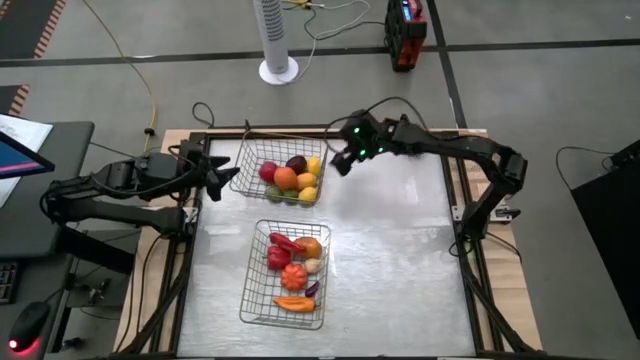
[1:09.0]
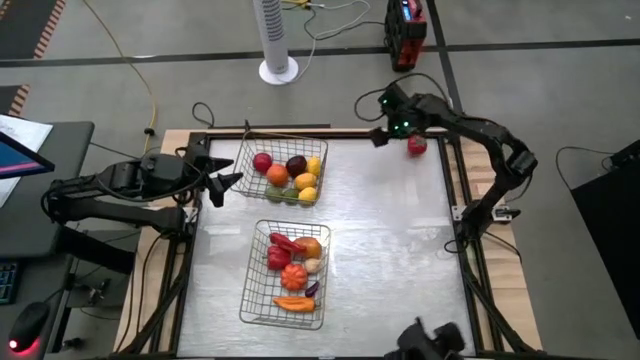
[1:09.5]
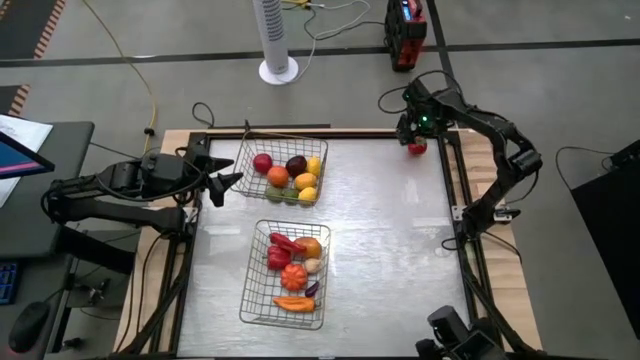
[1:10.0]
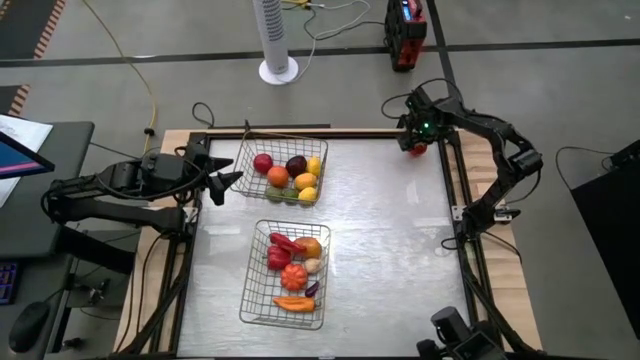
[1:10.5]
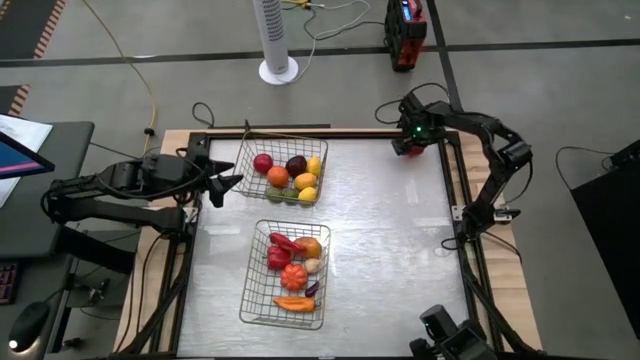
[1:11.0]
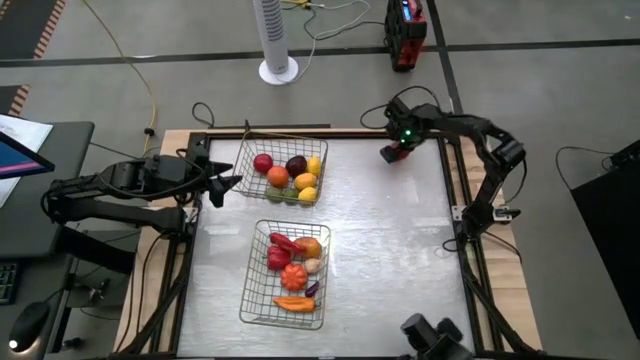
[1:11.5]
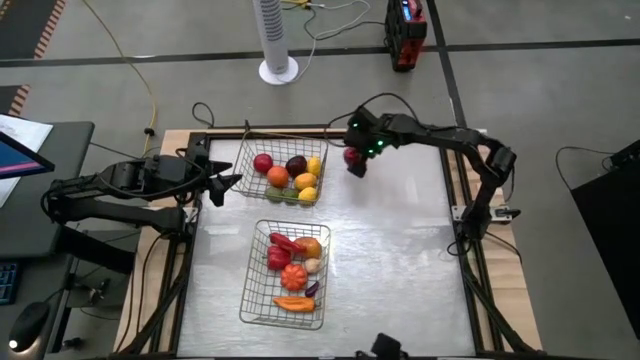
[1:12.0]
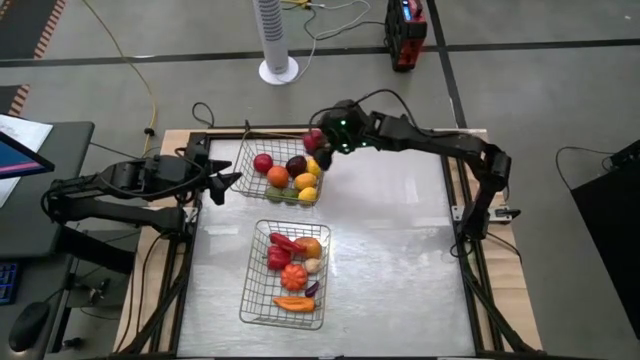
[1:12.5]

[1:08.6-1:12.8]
Task: Sort produce into baskets
Put the tomato into the top wire basket

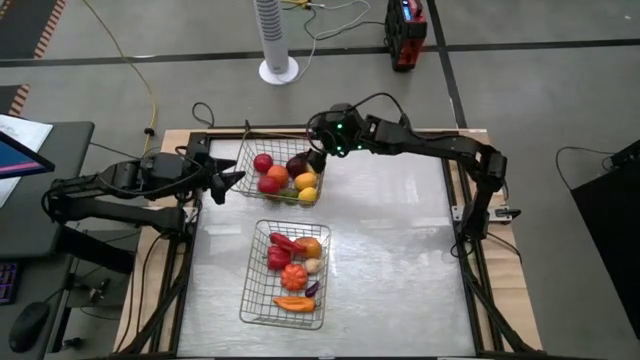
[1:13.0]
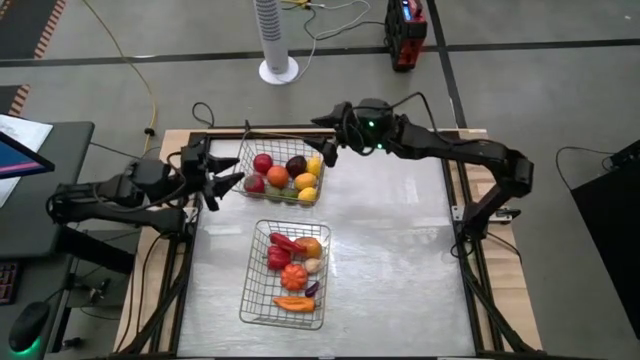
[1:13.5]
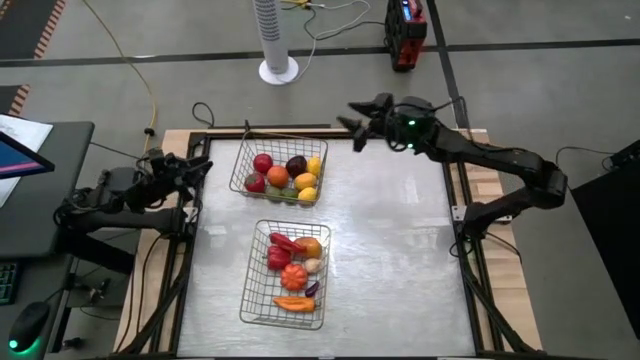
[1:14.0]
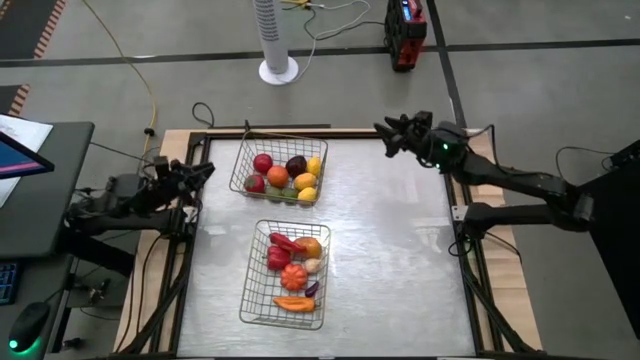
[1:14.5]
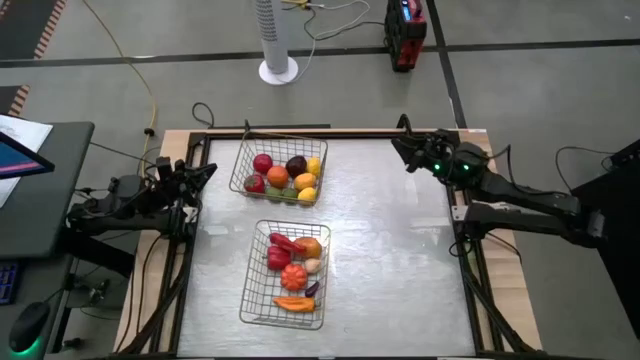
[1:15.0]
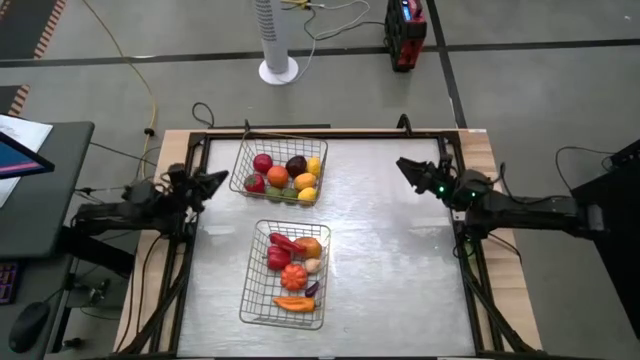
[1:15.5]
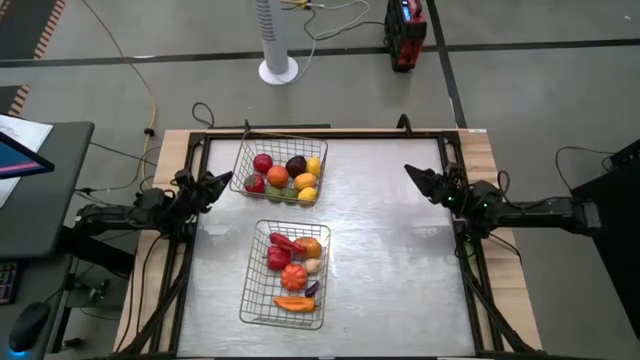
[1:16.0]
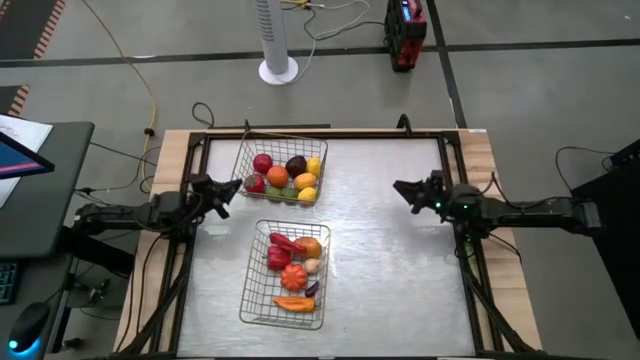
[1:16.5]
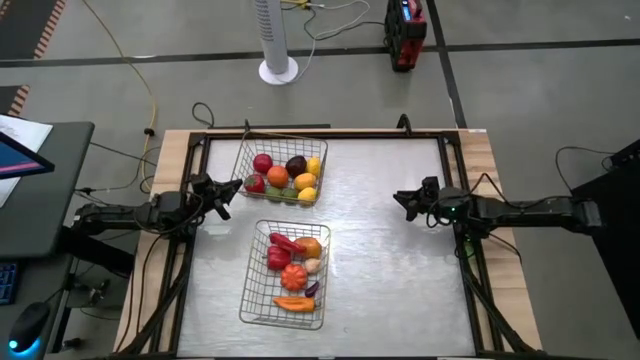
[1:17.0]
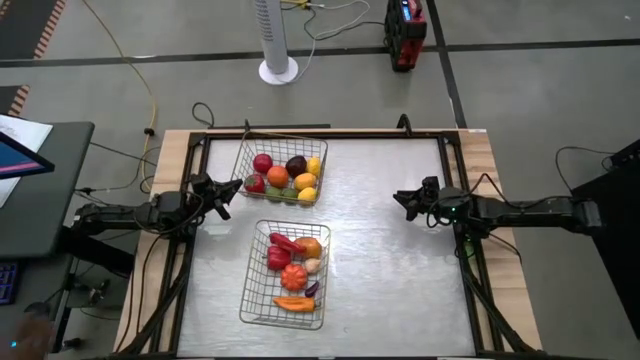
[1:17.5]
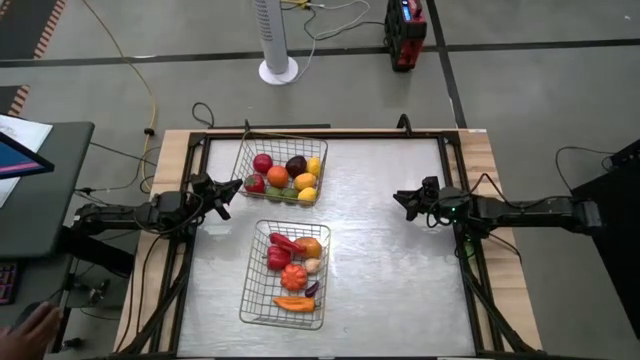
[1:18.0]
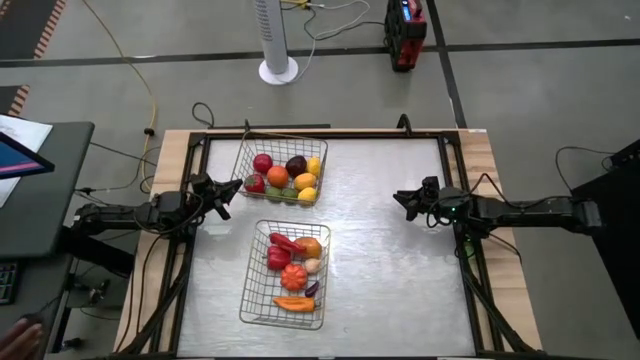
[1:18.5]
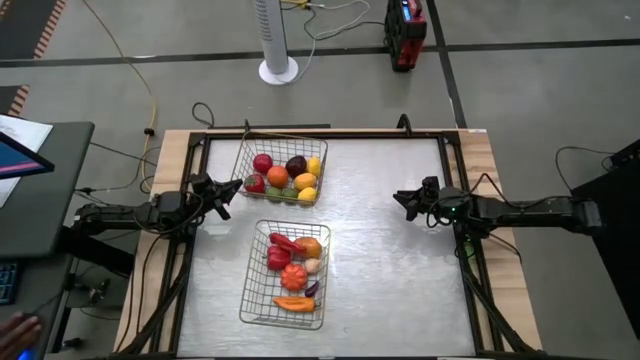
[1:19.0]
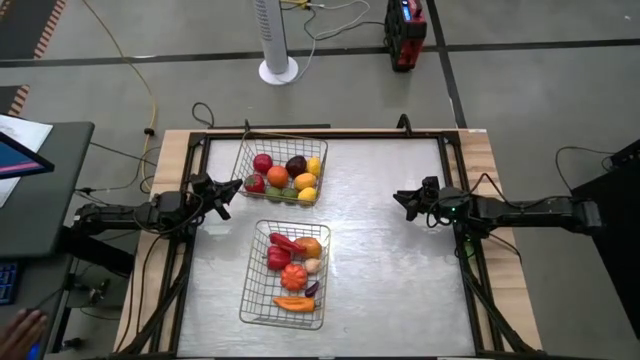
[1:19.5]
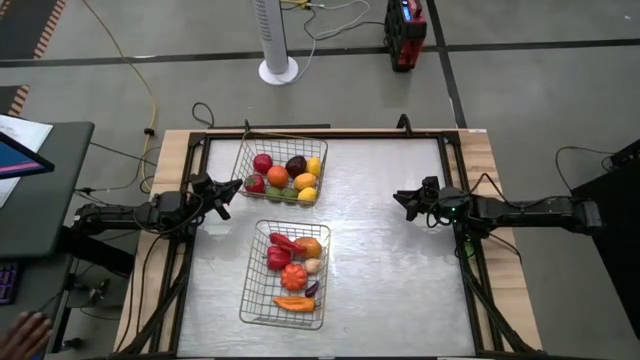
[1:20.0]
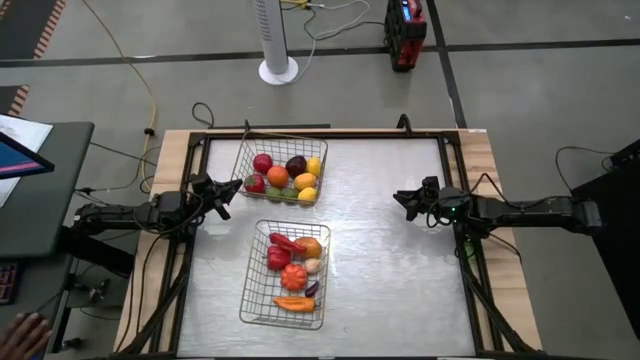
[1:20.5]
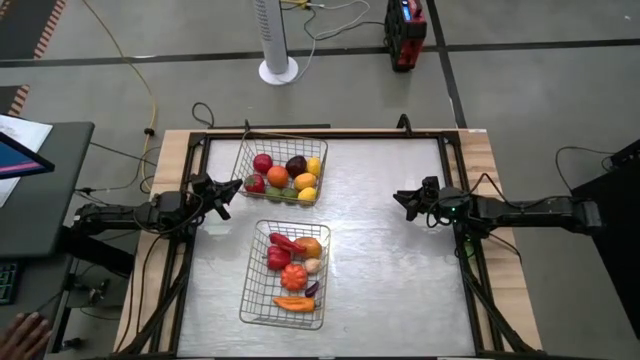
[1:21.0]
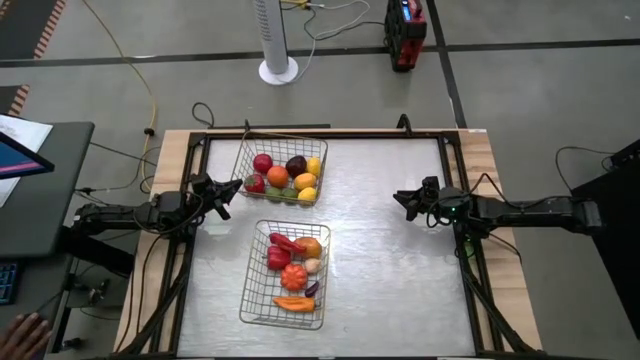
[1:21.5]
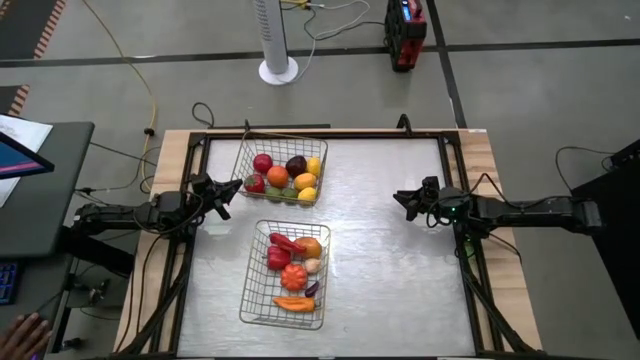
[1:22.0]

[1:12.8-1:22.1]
Return to Home Position

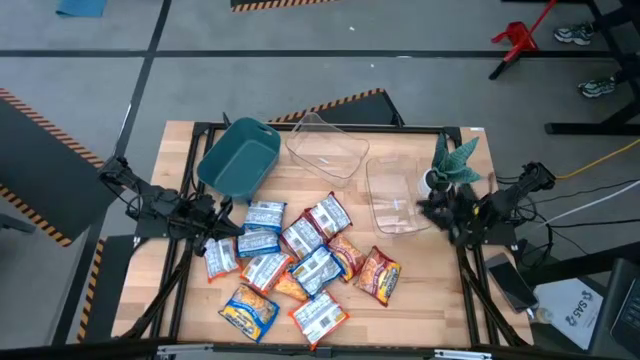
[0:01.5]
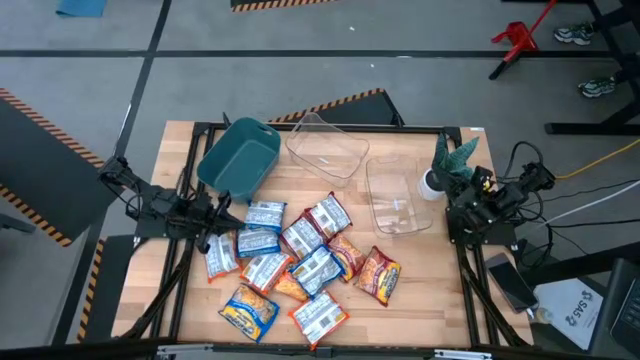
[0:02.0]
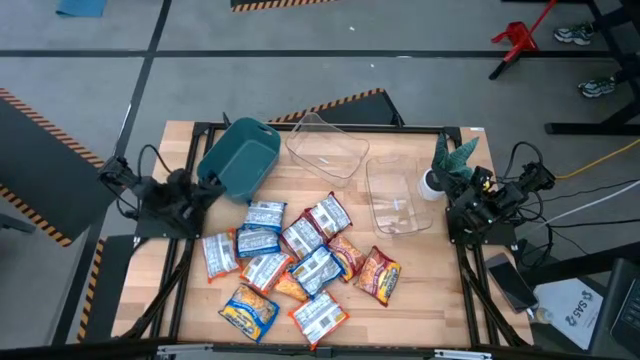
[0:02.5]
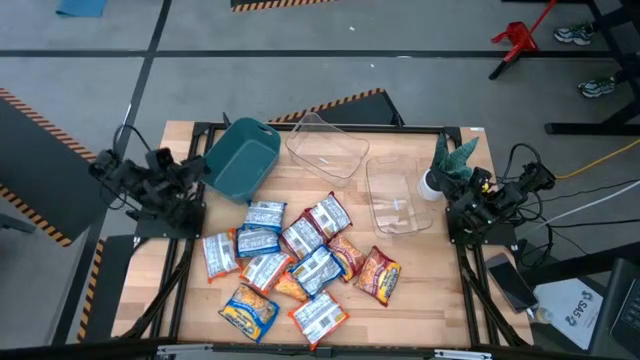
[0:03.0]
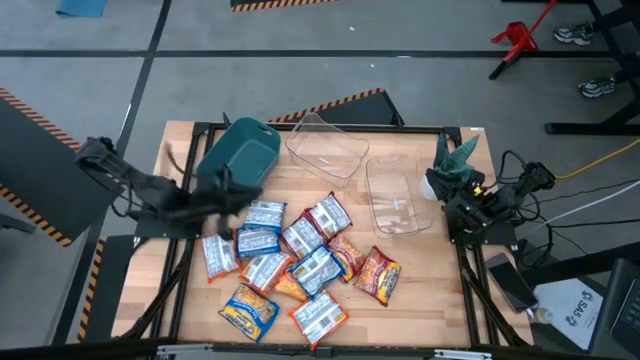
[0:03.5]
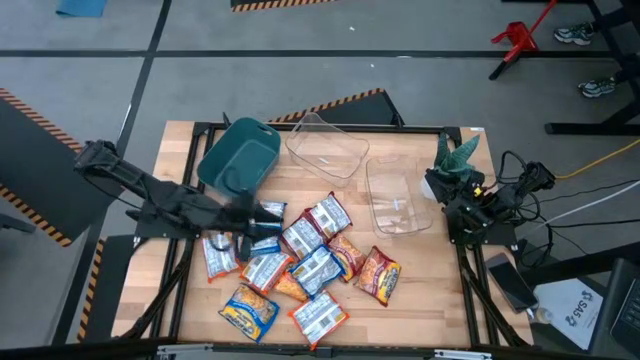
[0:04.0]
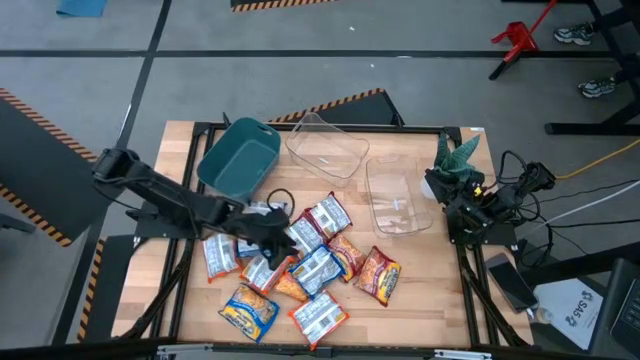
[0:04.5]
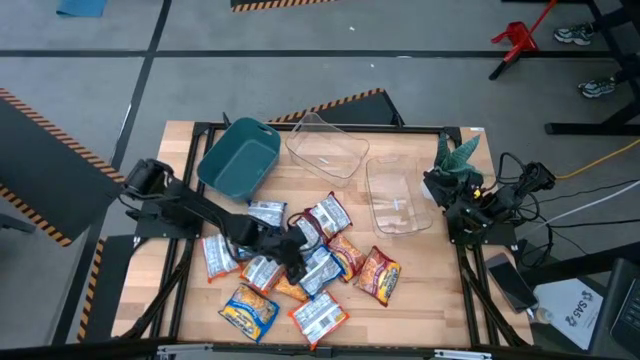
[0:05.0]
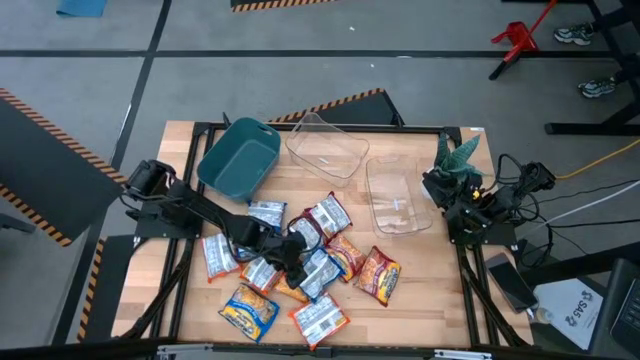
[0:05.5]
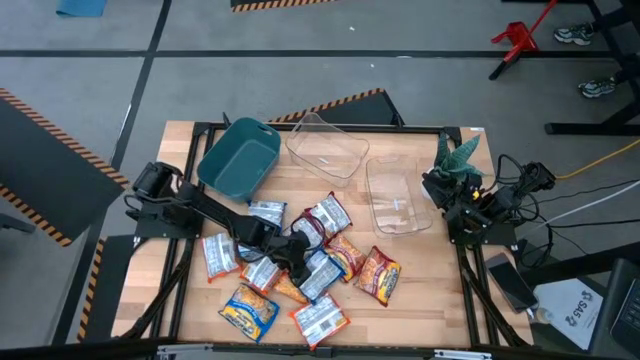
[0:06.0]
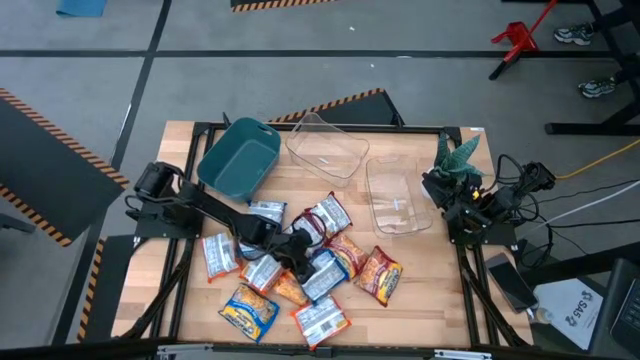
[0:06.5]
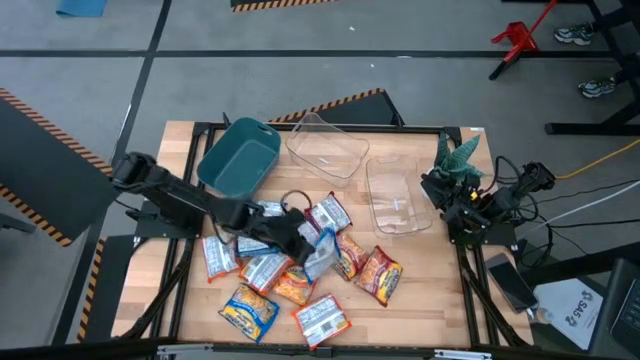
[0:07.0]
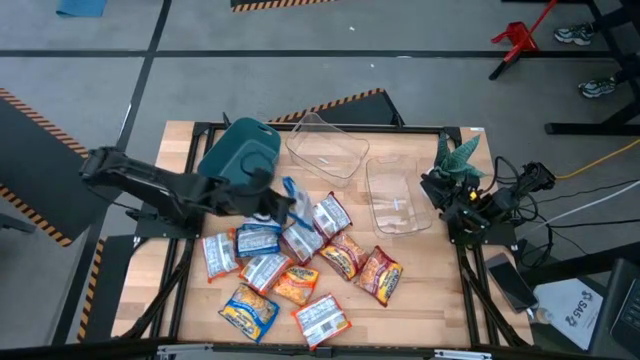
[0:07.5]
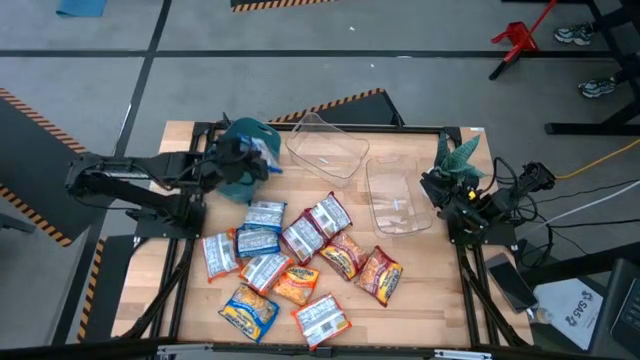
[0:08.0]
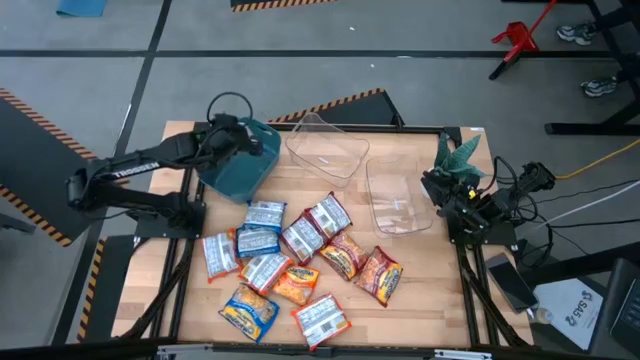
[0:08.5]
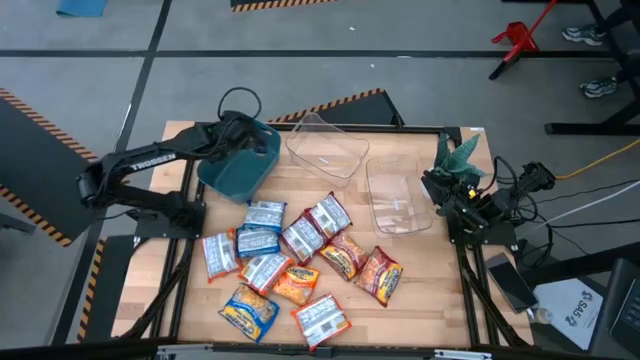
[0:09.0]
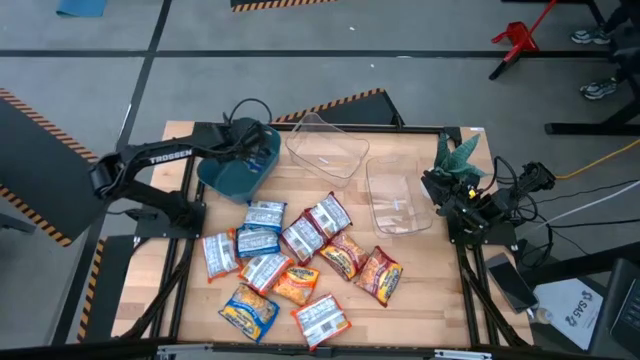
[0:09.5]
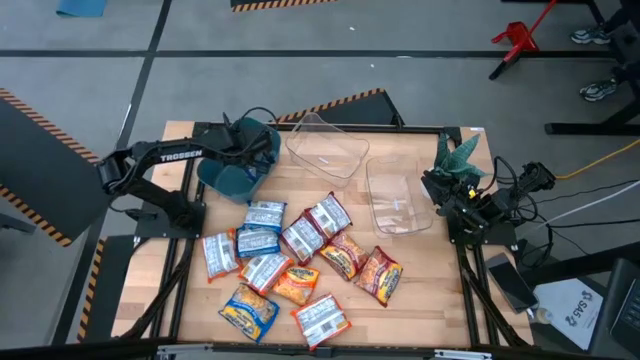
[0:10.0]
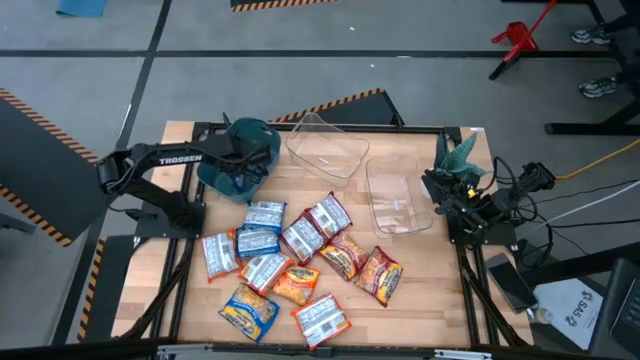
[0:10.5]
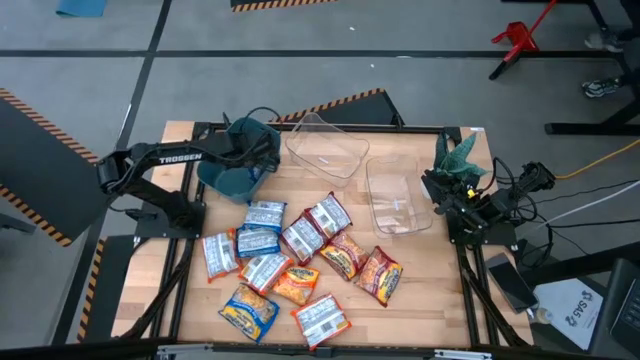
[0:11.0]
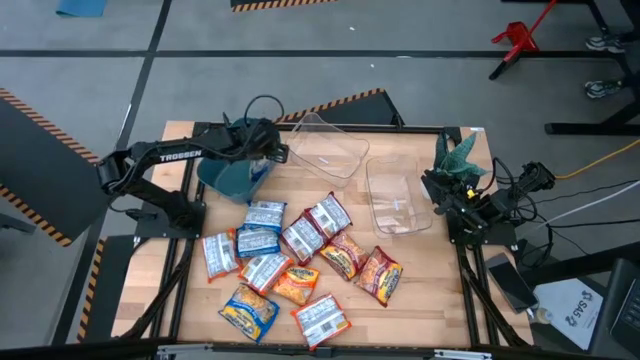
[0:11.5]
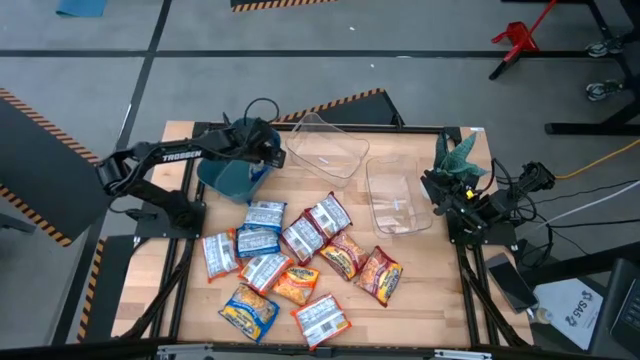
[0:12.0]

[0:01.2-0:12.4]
Task: Sort Maruchan noodles
Put the blue noodle pack into the blue bin
